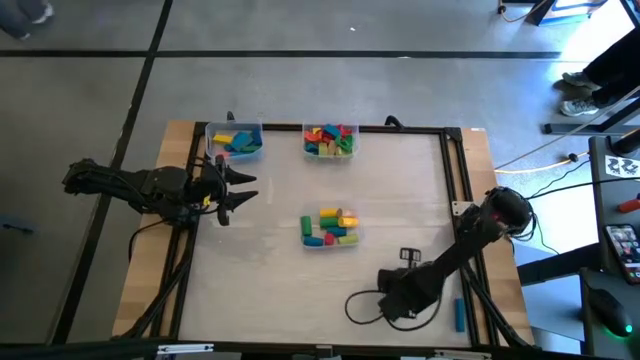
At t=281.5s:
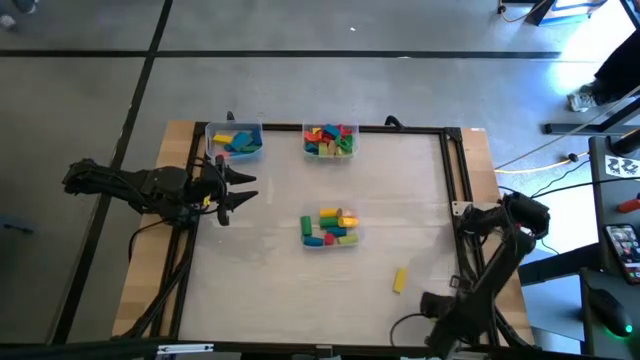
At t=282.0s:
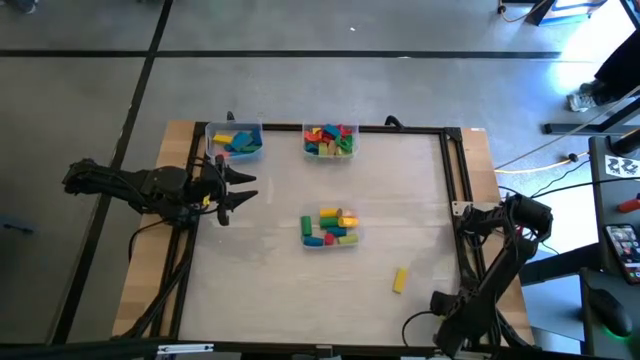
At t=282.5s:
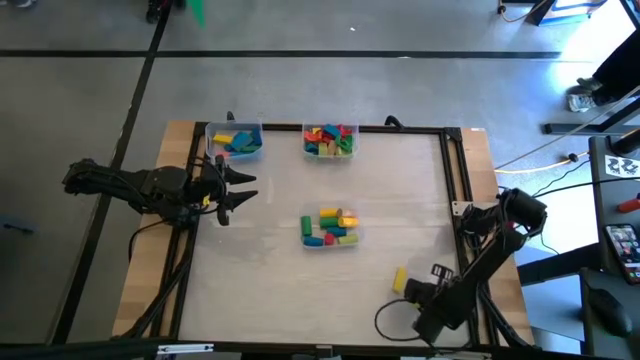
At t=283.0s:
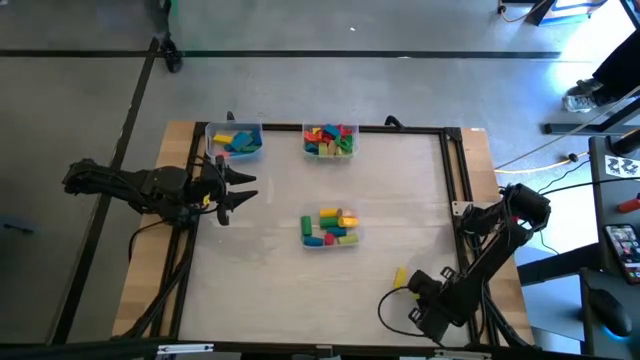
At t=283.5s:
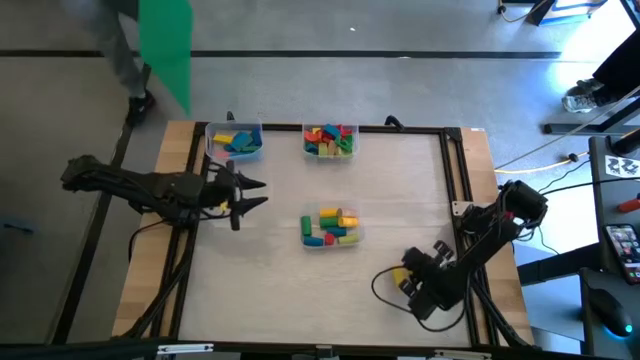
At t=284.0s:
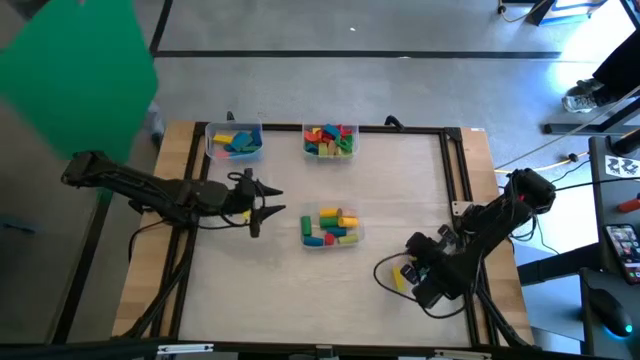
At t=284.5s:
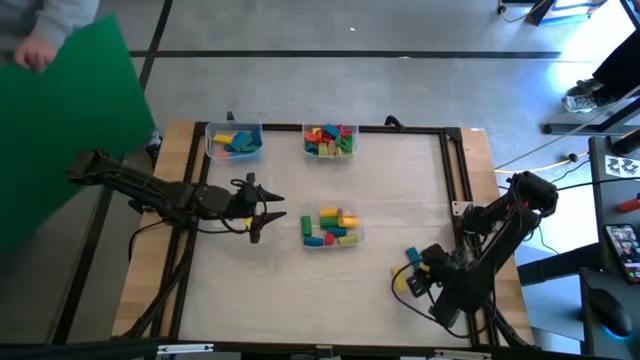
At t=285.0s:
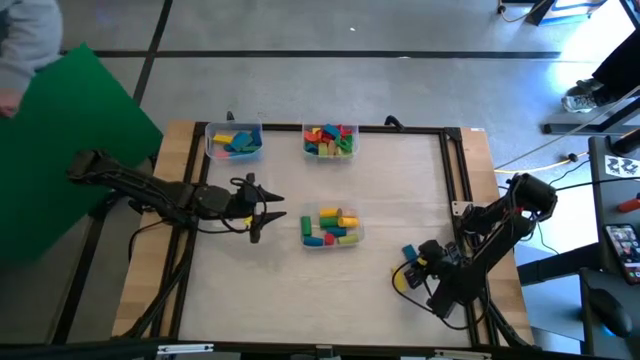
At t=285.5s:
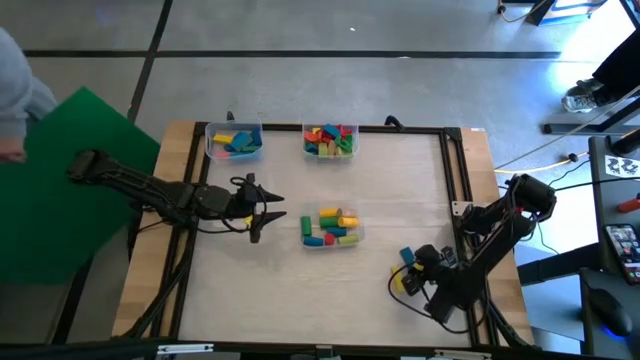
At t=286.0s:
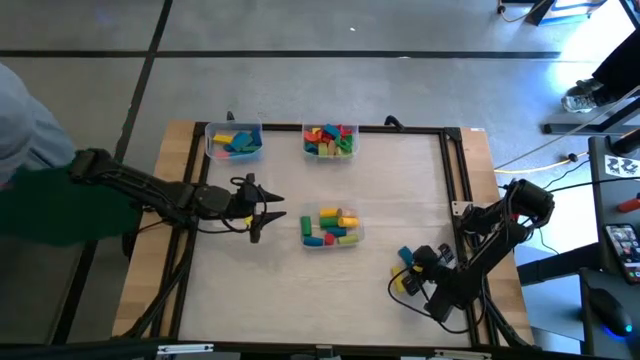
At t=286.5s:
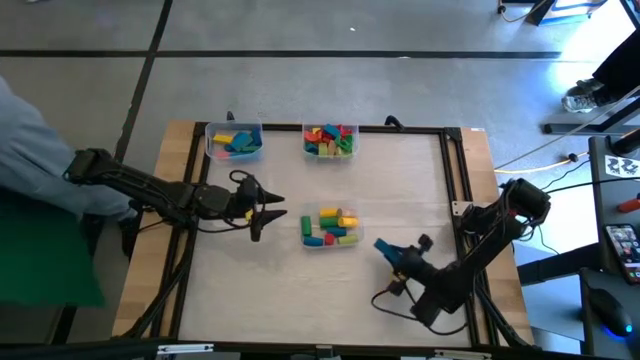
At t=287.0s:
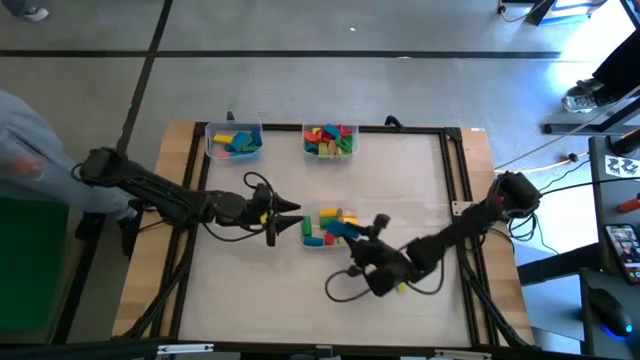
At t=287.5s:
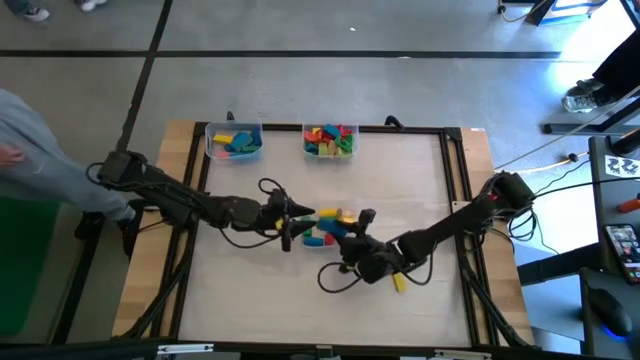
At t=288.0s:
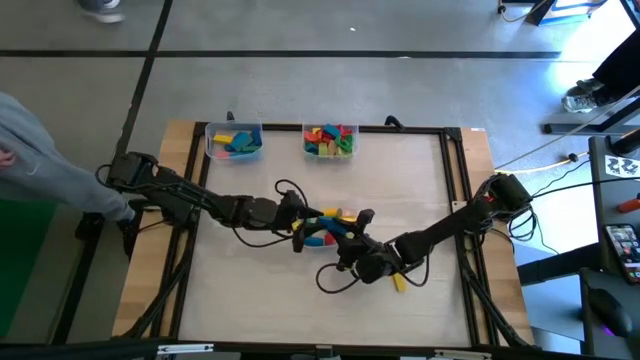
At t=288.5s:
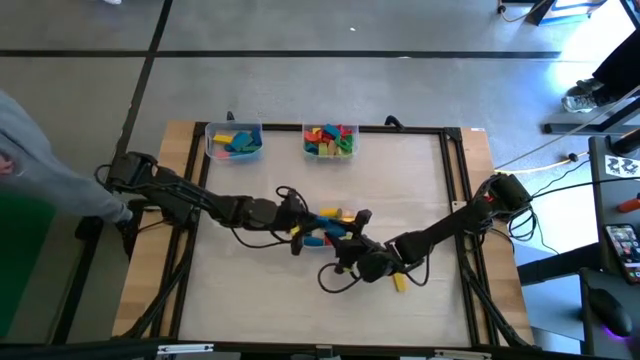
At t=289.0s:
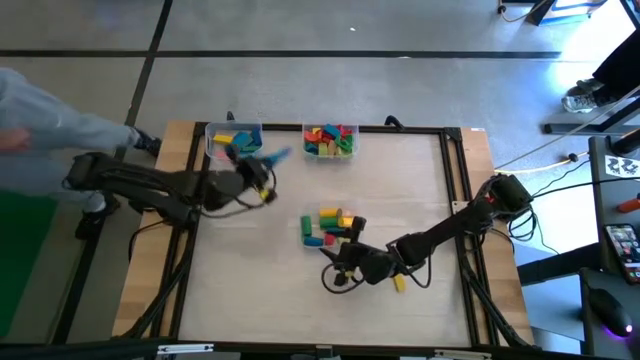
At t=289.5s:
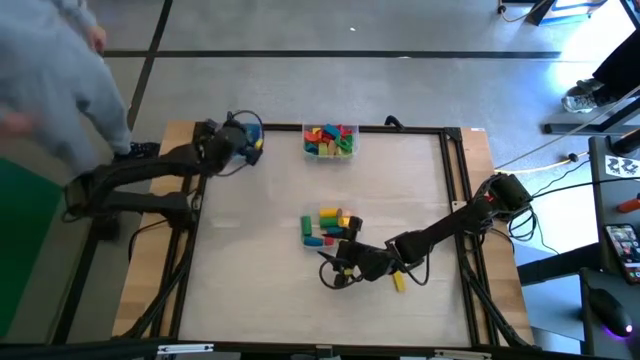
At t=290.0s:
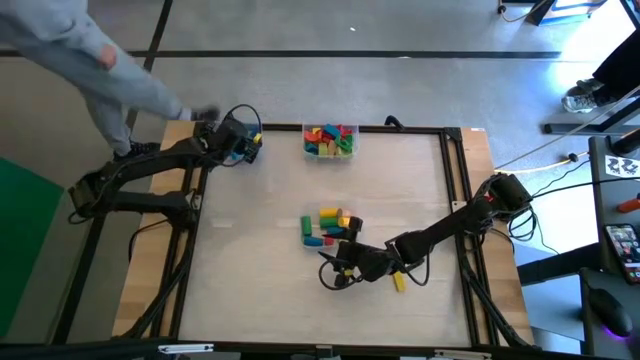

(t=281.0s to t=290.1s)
Task: Sort blocks by size
Put the light blue rectangular block into the top left transparent bin

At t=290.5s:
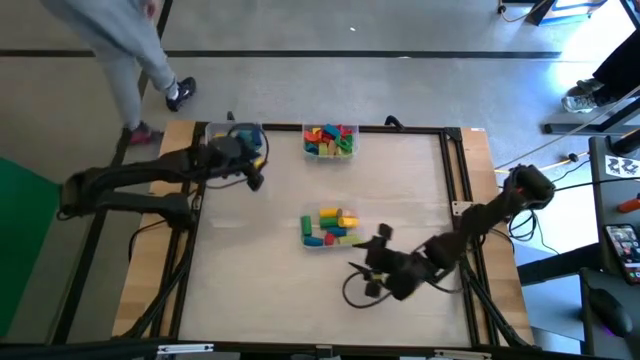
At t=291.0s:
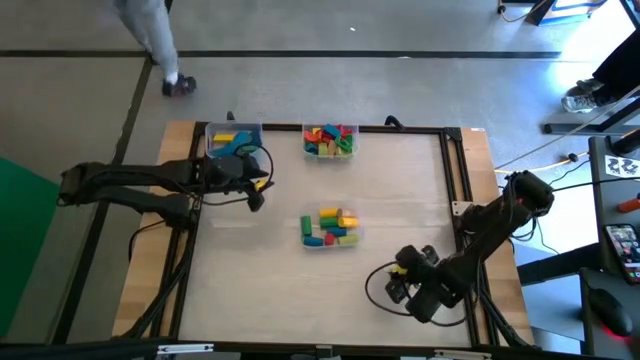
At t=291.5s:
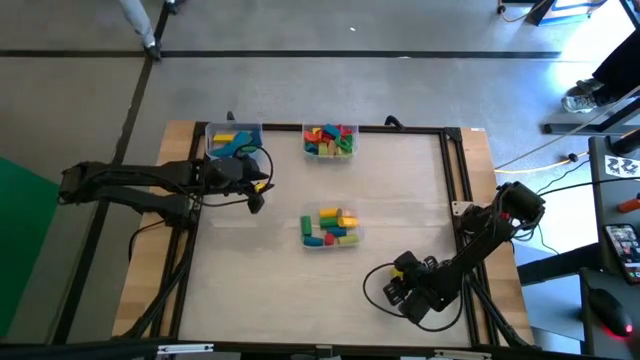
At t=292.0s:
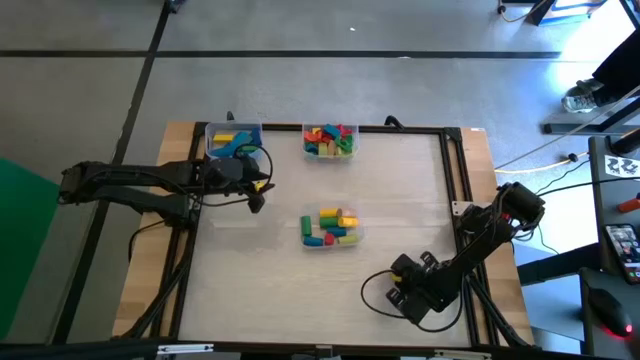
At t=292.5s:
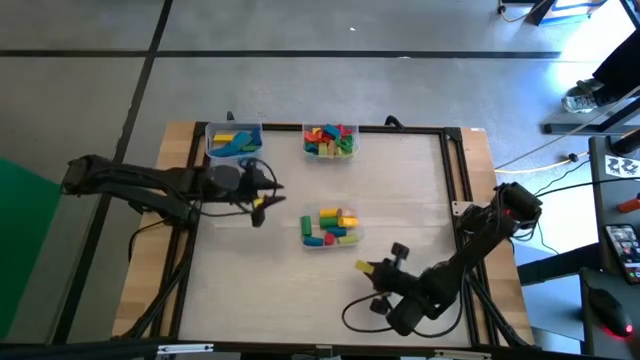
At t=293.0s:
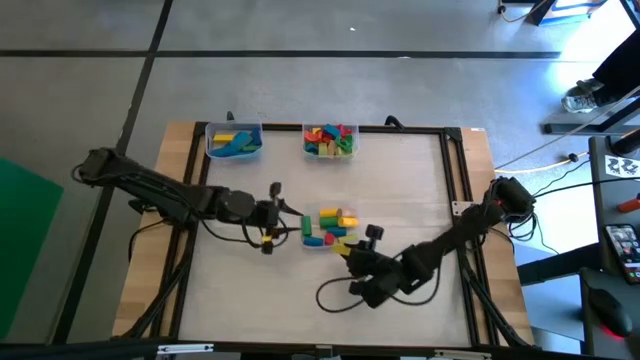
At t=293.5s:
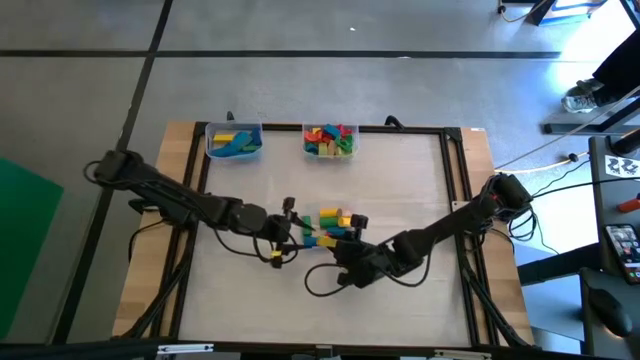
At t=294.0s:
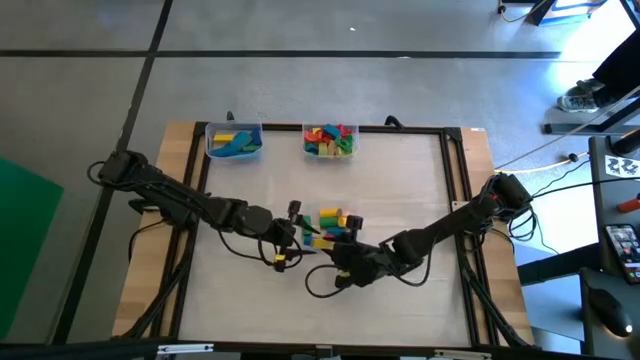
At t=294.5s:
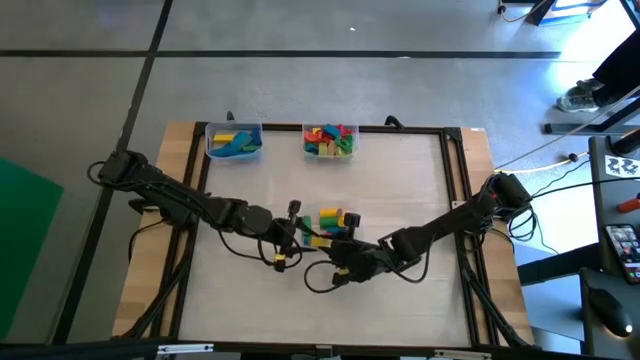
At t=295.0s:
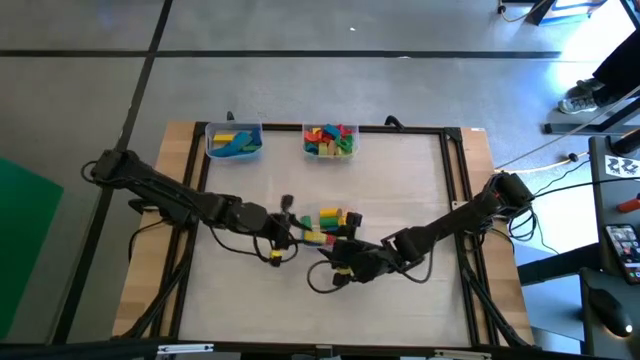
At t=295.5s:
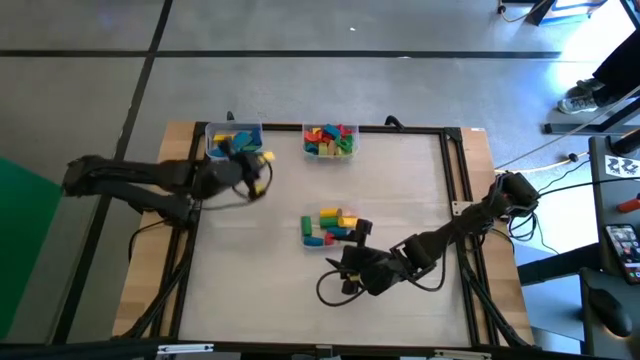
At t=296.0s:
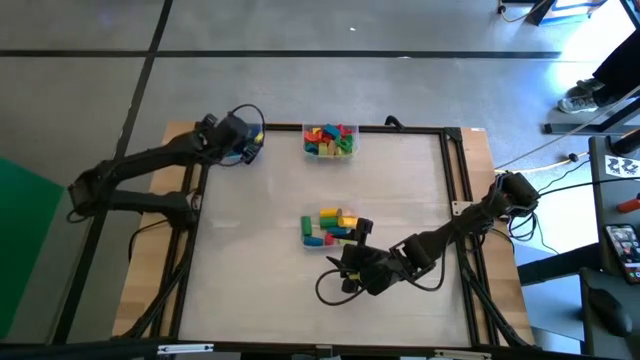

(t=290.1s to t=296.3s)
Put the yellow rectangular block into the top left transparent bin

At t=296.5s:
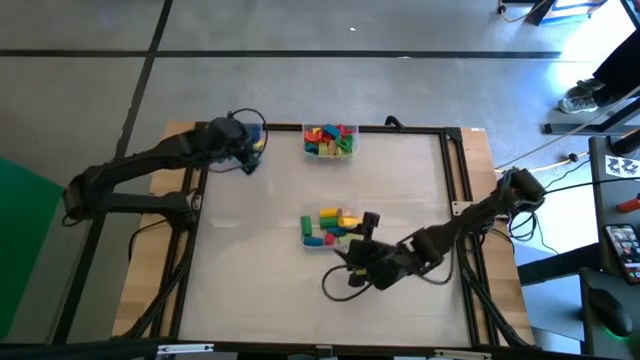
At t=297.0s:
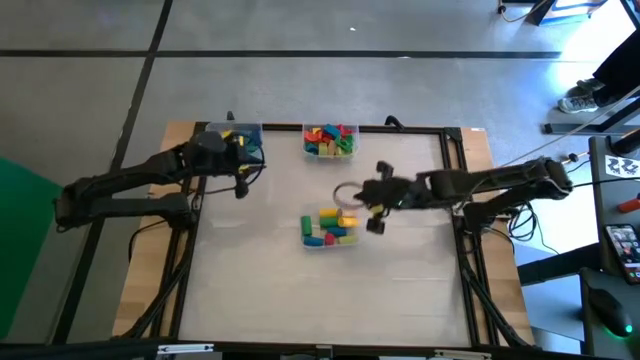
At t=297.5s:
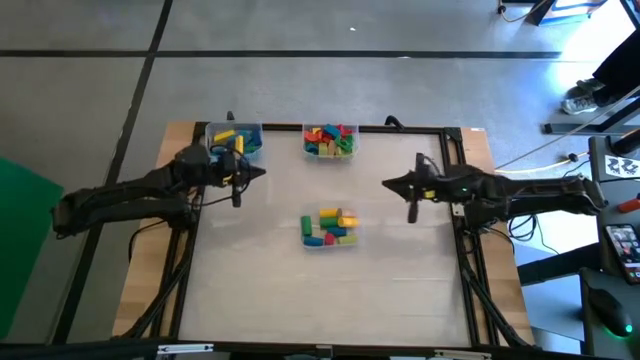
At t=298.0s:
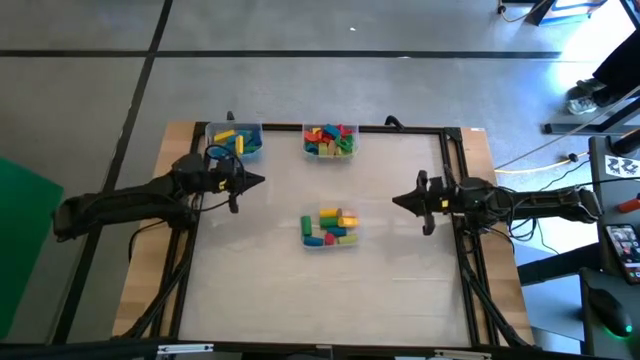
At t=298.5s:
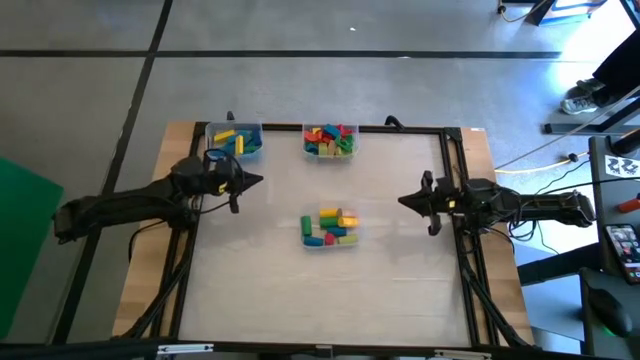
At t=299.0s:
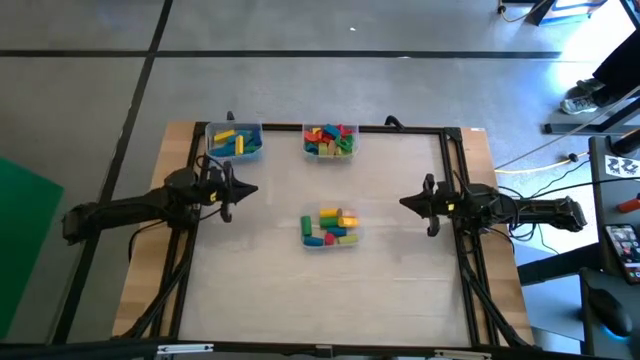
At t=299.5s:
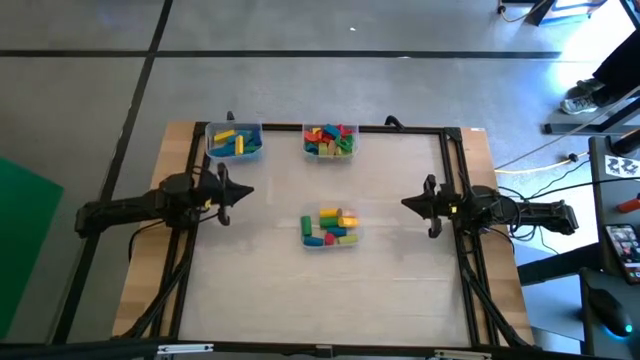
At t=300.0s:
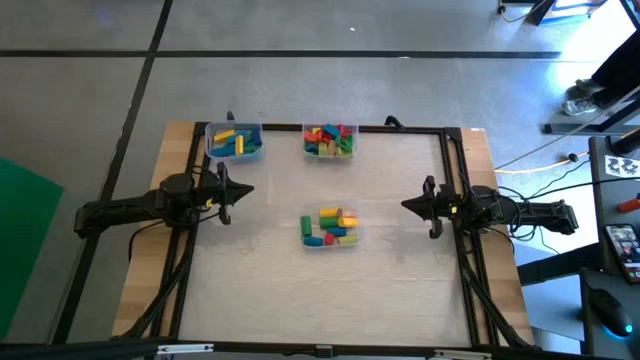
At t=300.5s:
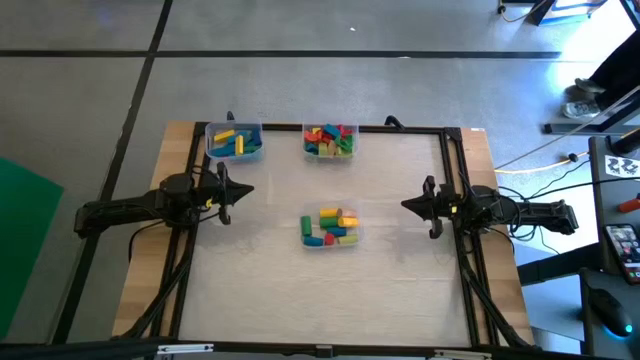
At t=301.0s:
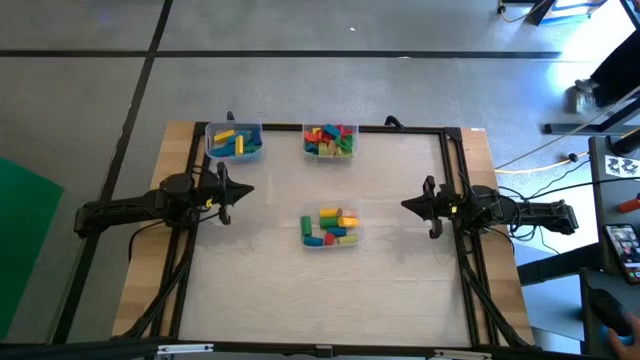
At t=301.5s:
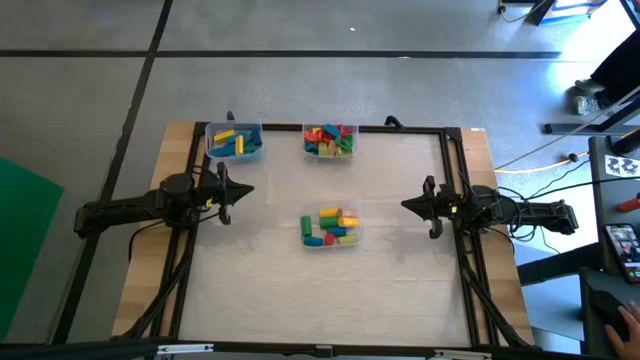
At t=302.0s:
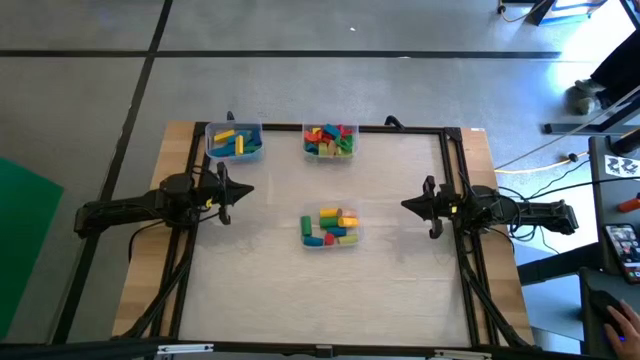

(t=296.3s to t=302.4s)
Return to Home Position
